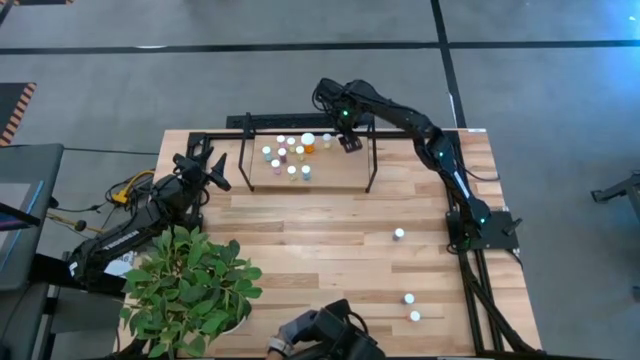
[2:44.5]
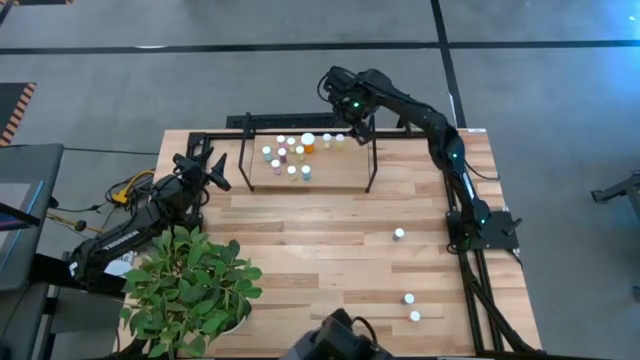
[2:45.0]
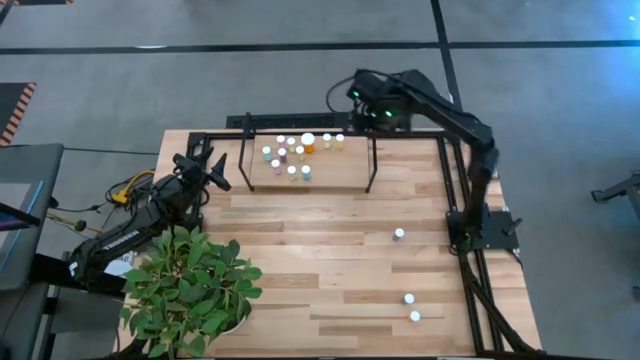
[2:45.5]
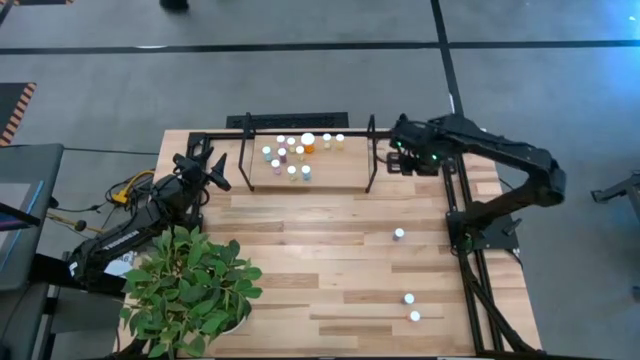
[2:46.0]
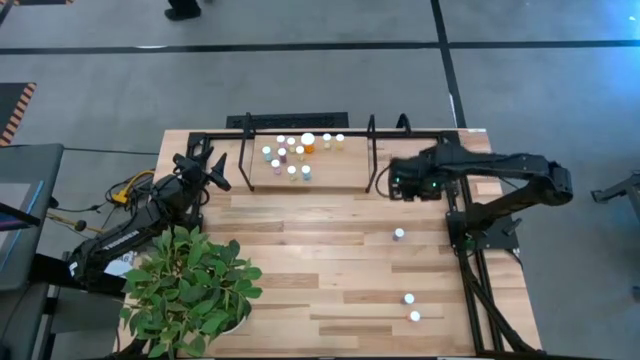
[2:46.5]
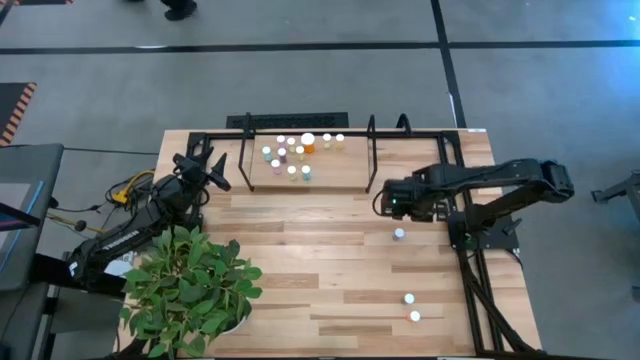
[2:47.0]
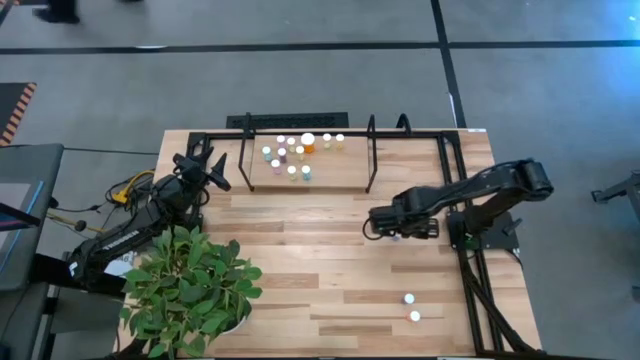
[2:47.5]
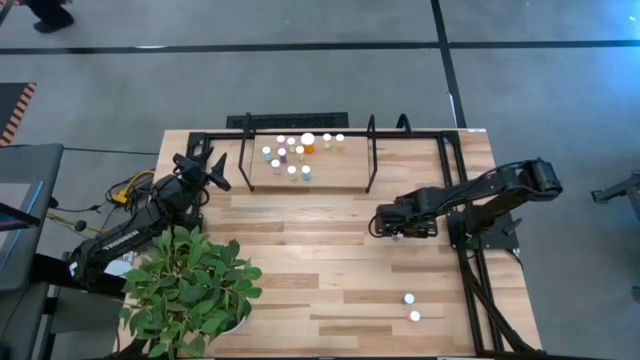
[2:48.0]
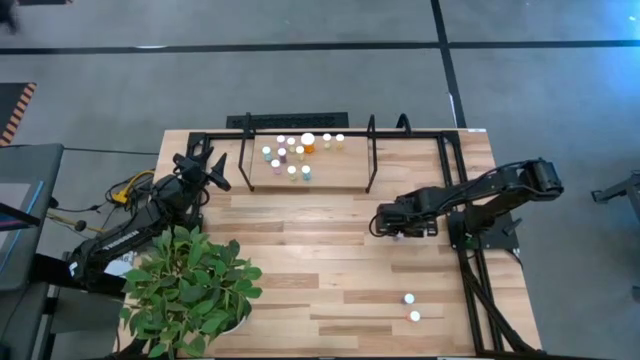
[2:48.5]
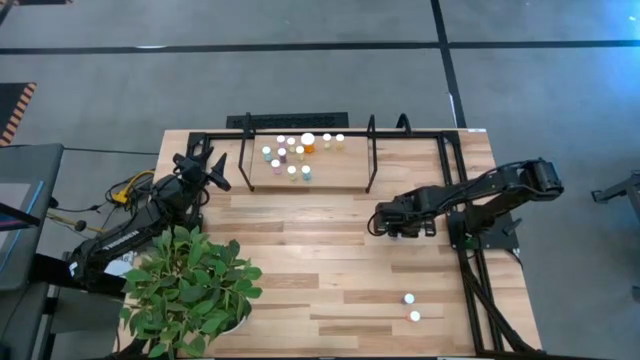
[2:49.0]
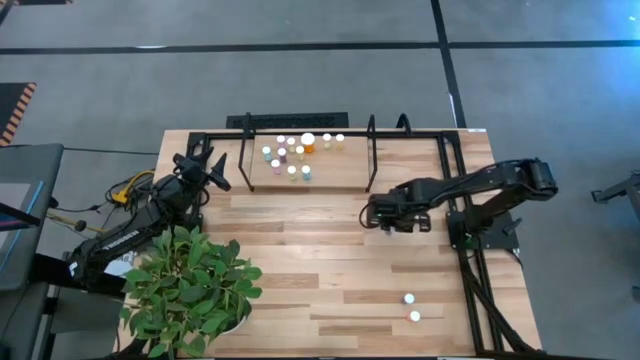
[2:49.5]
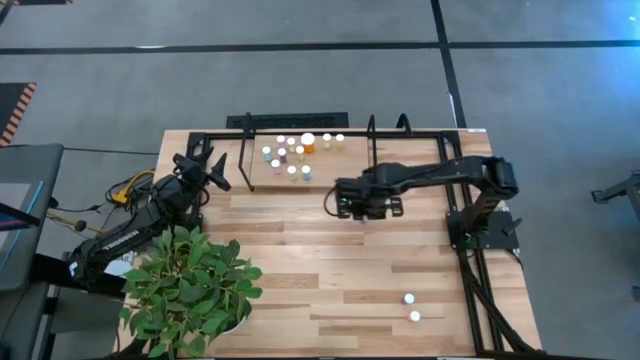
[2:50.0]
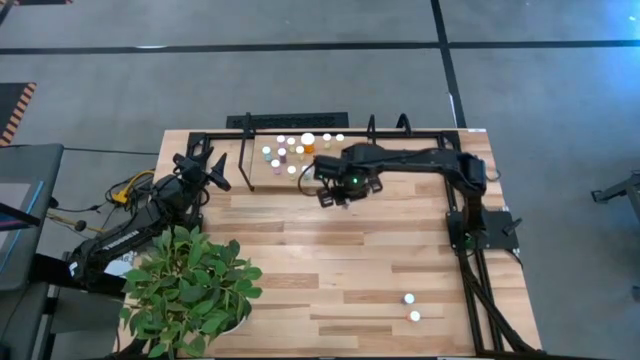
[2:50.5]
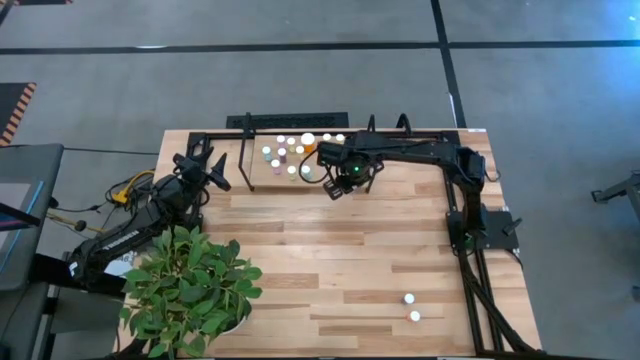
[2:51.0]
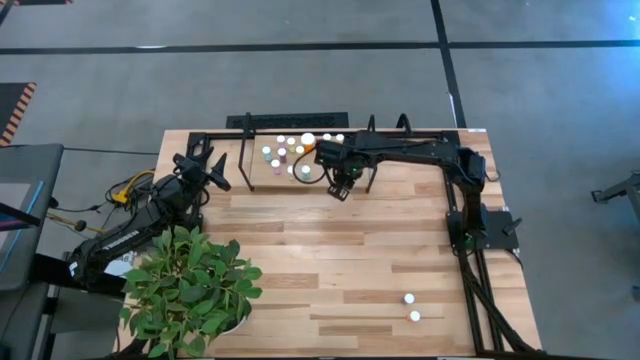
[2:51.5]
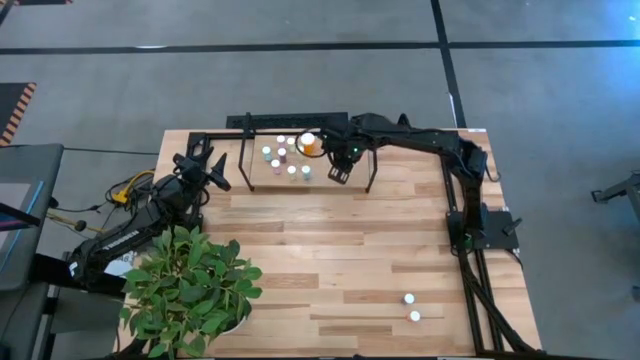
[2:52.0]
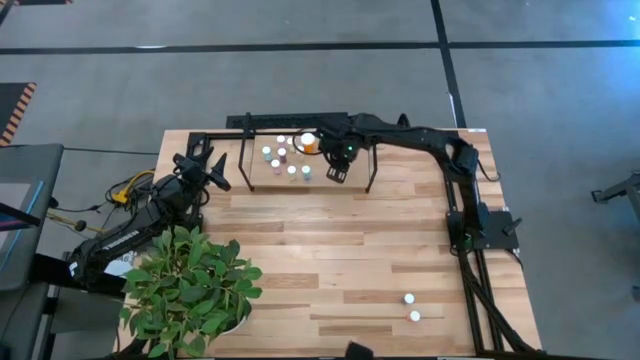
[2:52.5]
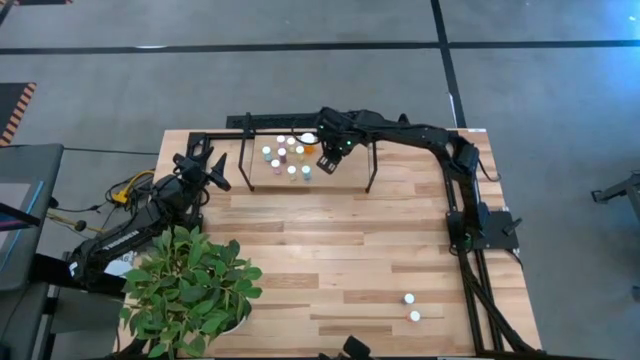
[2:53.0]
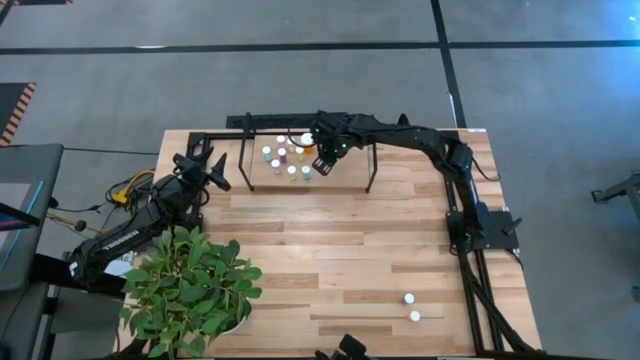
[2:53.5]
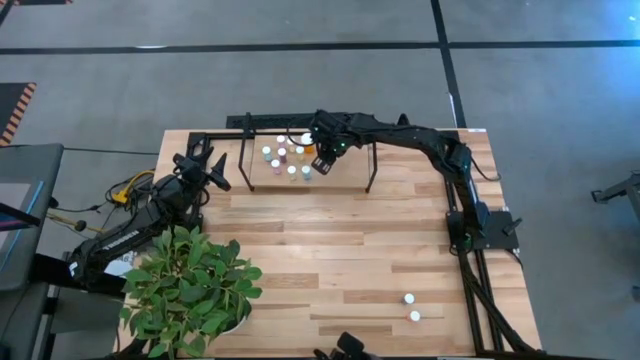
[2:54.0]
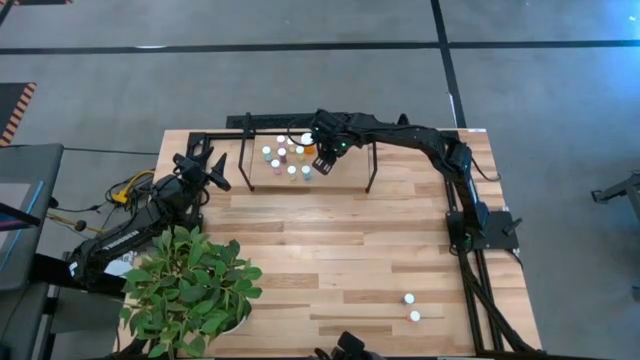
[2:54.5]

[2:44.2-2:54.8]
Task: Pick and place medicine bottles onto shelf by color
Put the blue pill bottle on the shelf

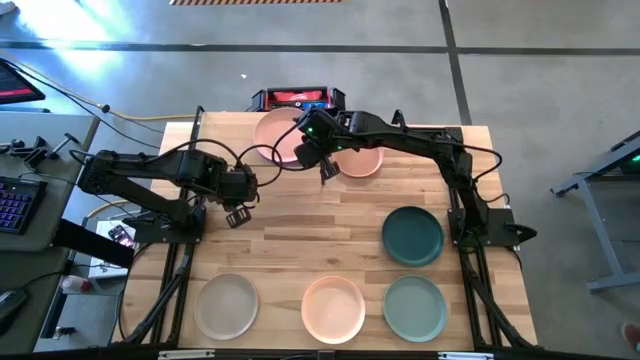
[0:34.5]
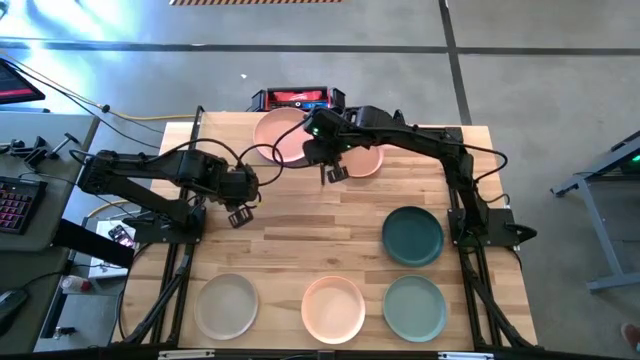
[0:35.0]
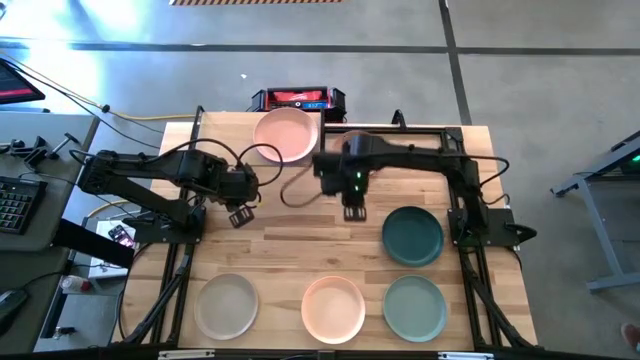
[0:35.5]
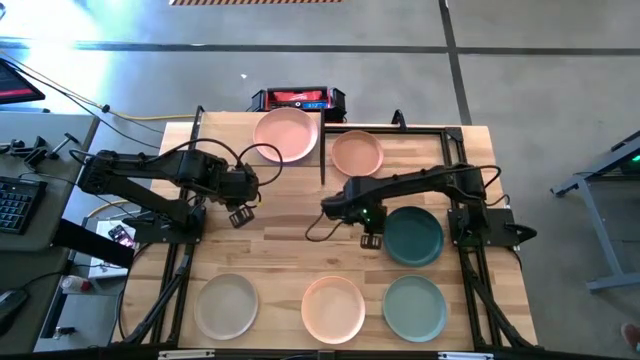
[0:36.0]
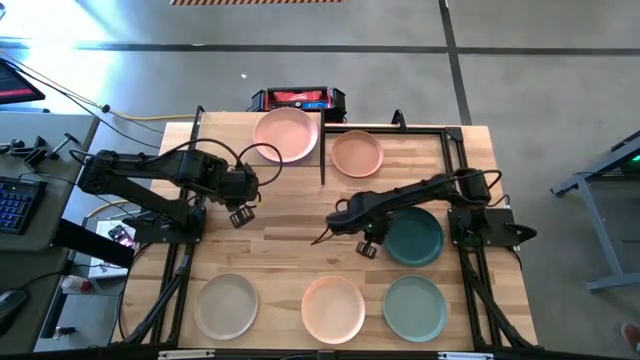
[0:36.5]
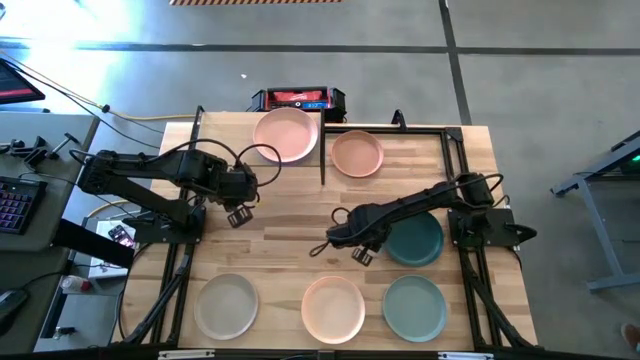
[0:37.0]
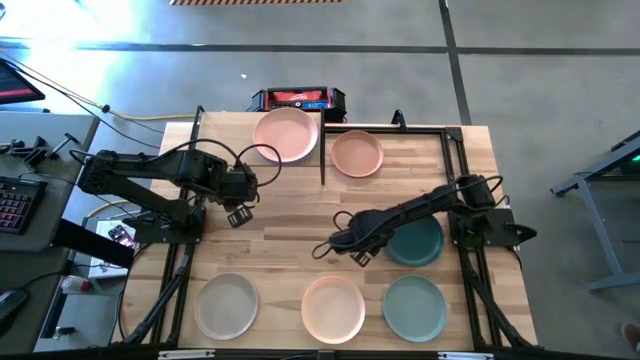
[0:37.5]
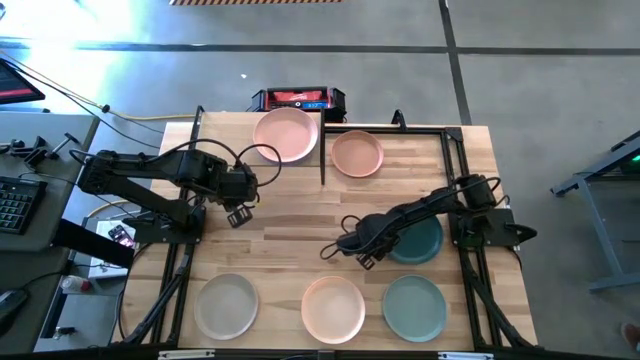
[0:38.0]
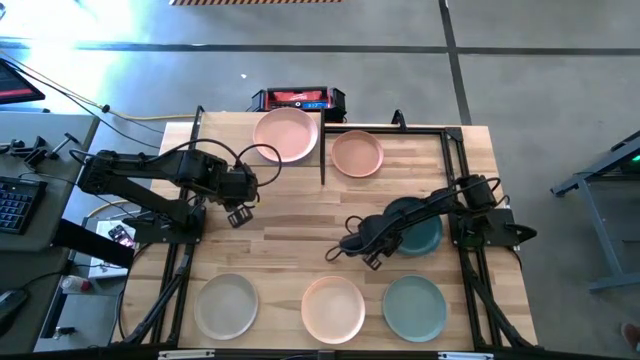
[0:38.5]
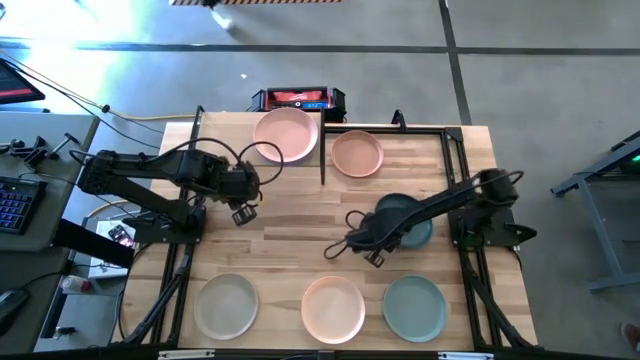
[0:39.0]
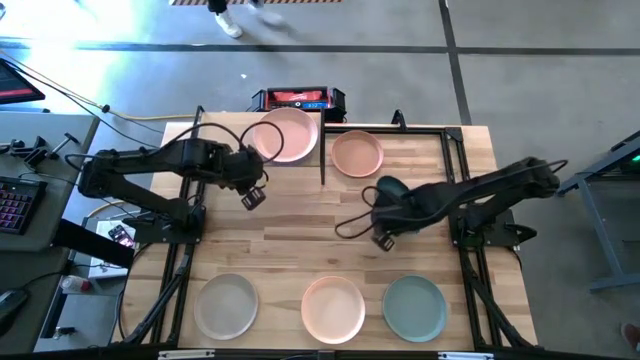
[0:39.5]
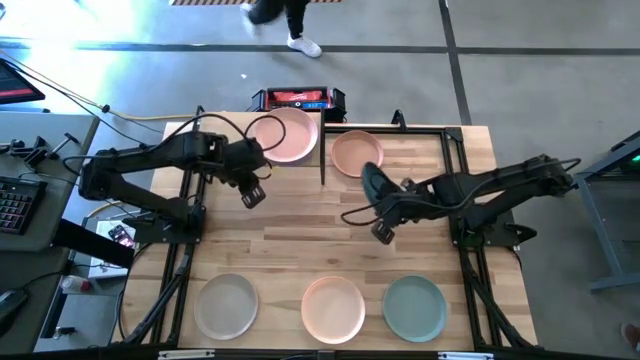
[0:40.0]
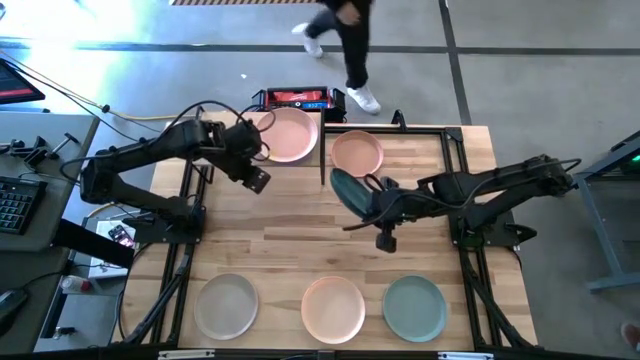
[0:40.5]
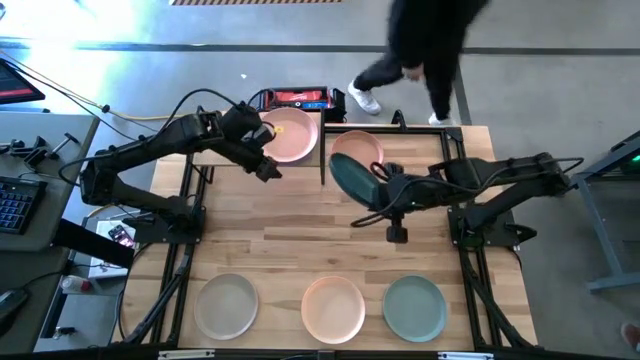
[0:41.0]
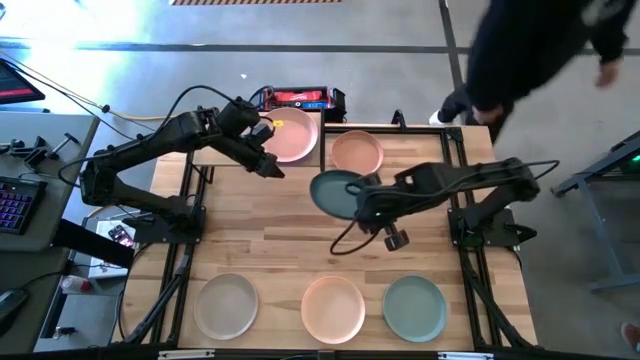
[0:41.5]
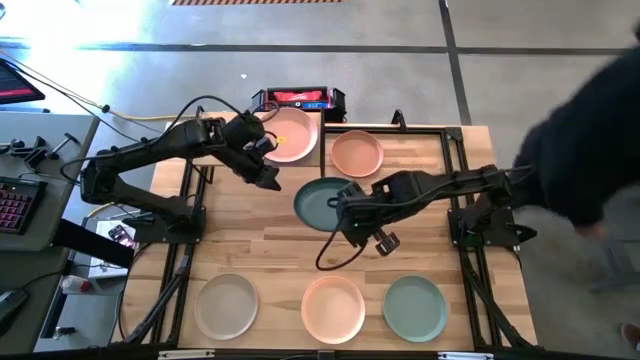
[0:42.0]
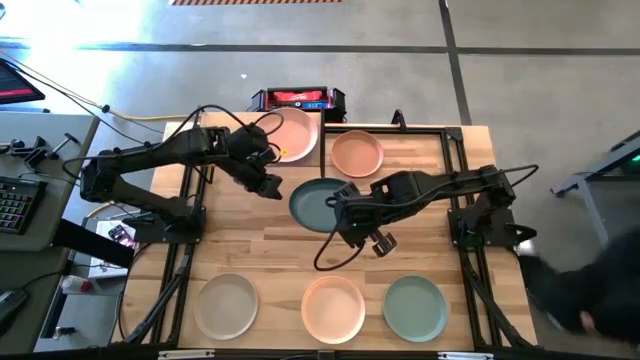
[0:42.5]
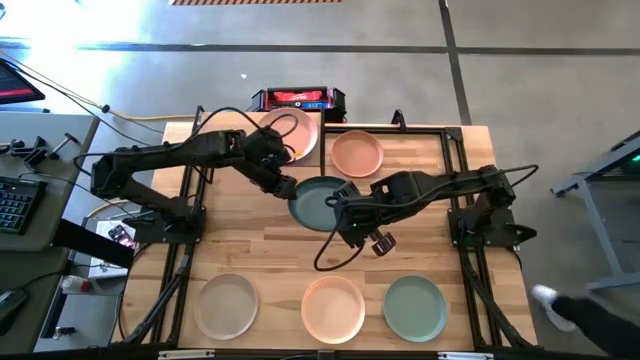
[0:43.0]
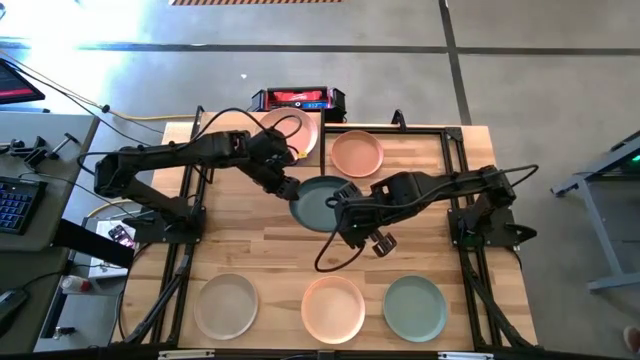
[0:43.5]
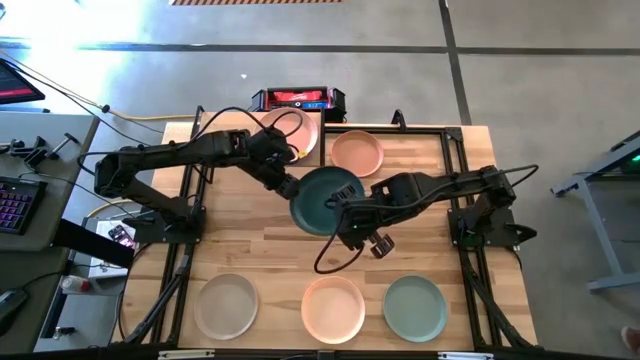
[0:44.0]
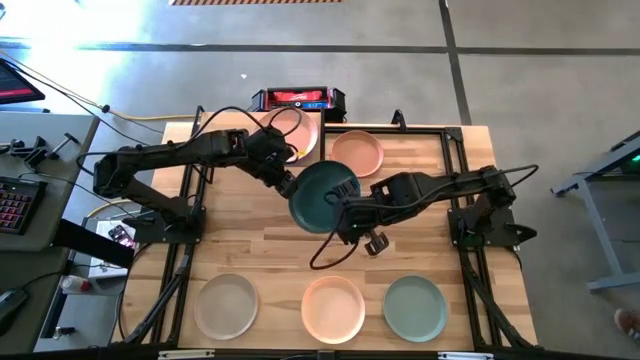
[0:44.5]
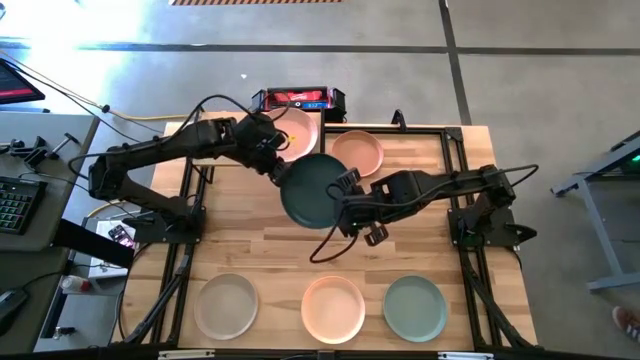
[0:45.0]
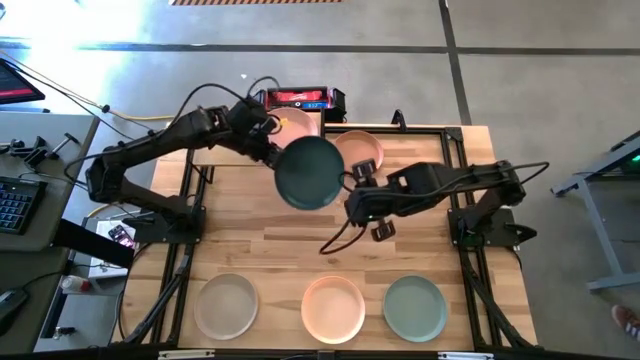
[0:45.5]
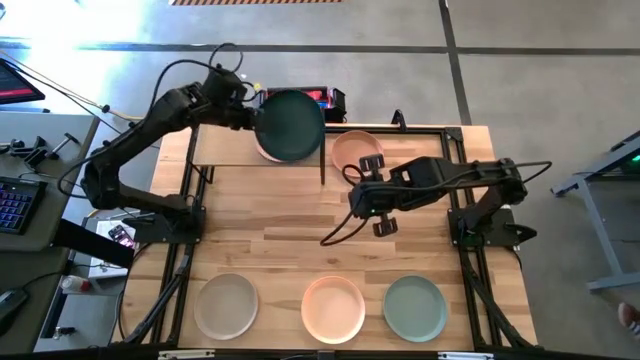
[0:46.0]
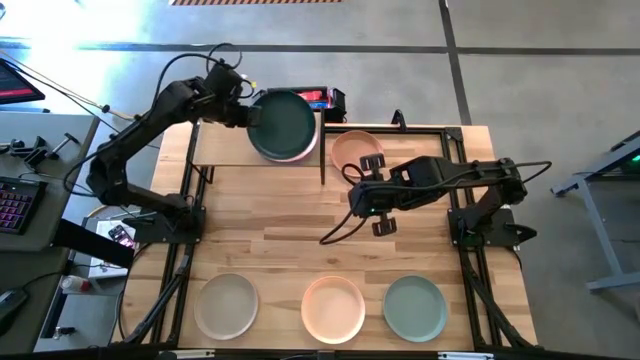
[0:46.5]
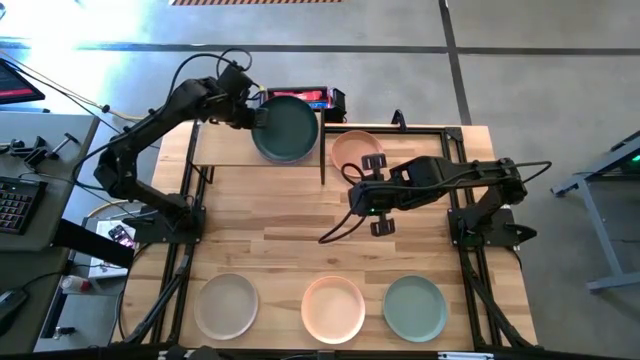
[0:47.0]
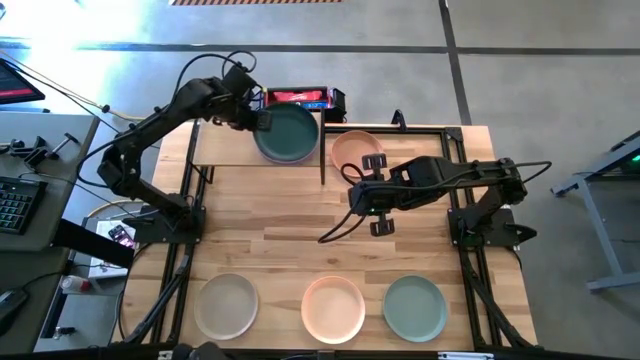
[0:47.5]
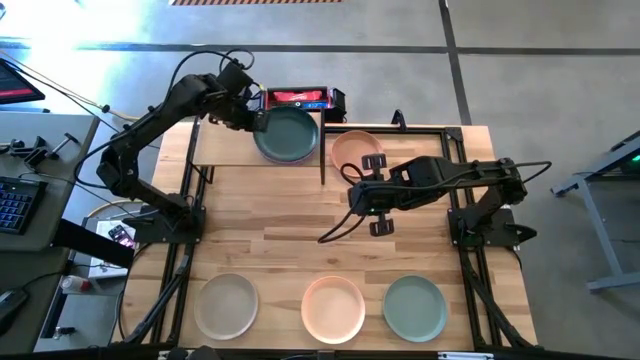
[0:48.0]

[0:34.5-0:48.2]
Task: Place and stack plates onto a shelf
Stack the dark green plate on top of the light pink plate on the shelf
